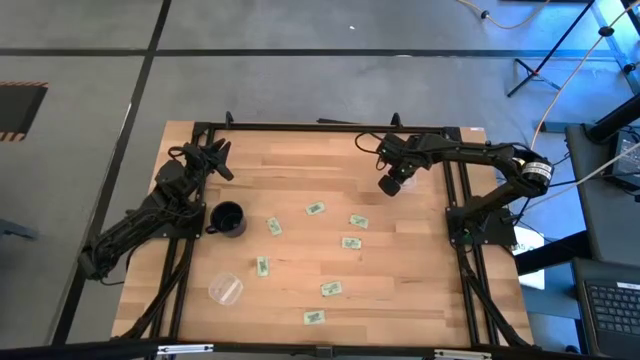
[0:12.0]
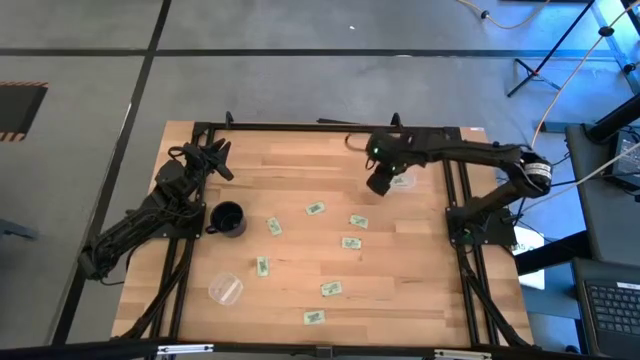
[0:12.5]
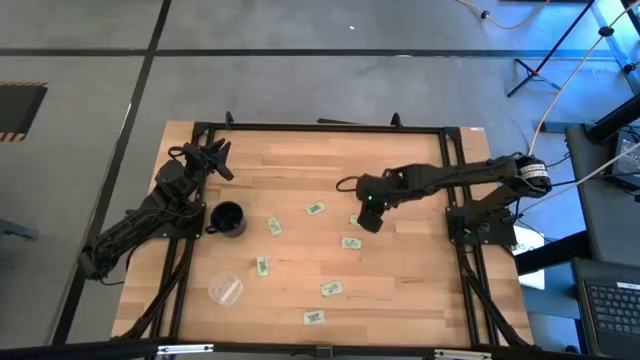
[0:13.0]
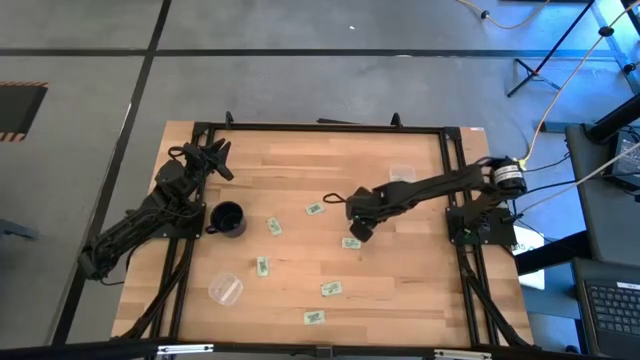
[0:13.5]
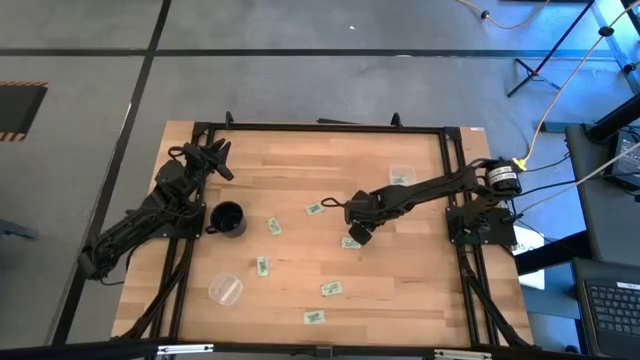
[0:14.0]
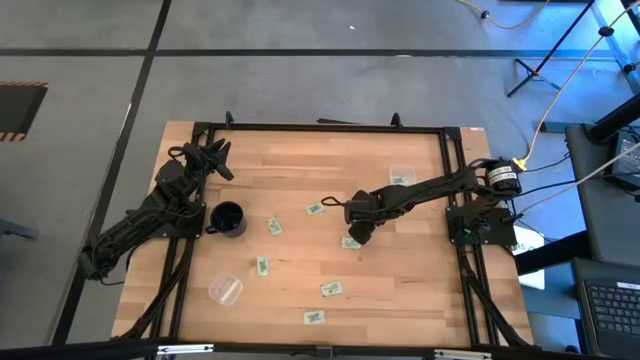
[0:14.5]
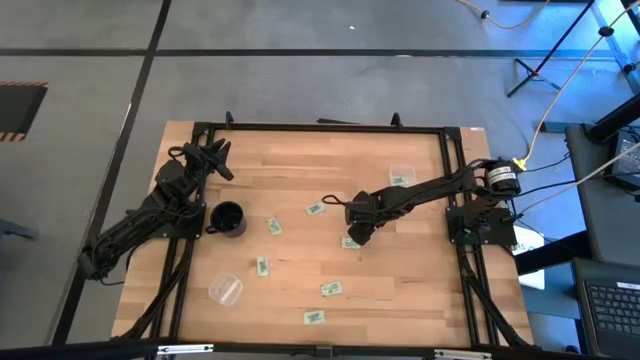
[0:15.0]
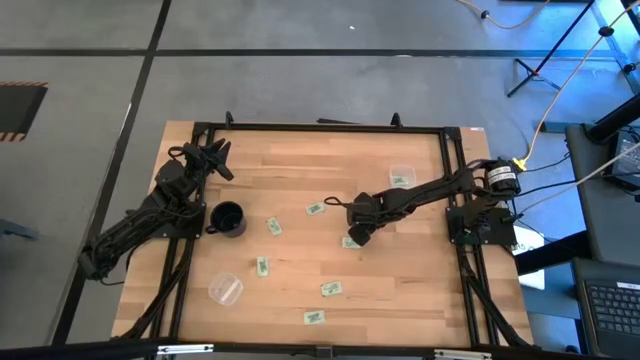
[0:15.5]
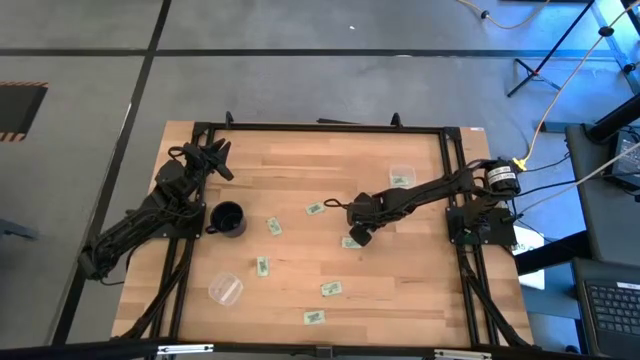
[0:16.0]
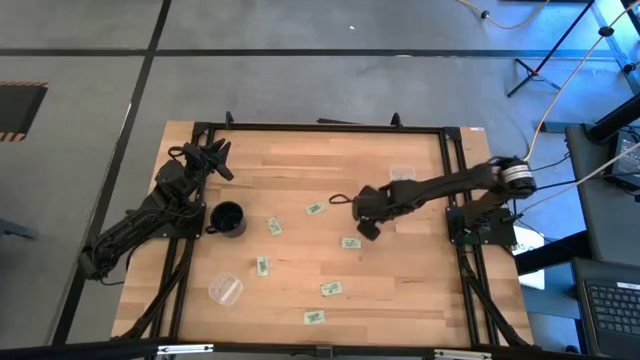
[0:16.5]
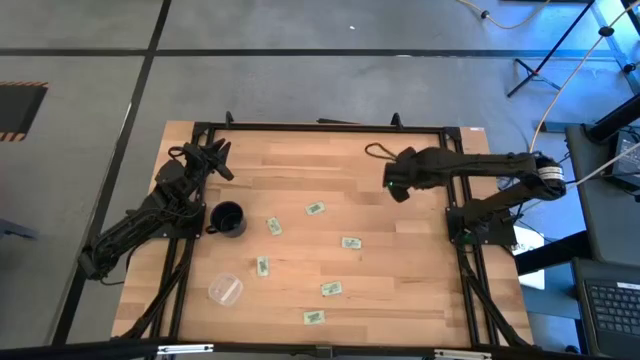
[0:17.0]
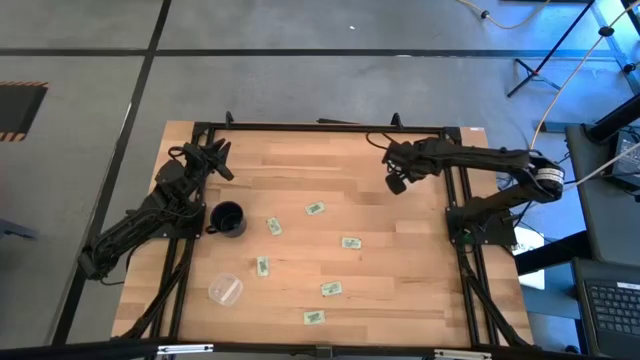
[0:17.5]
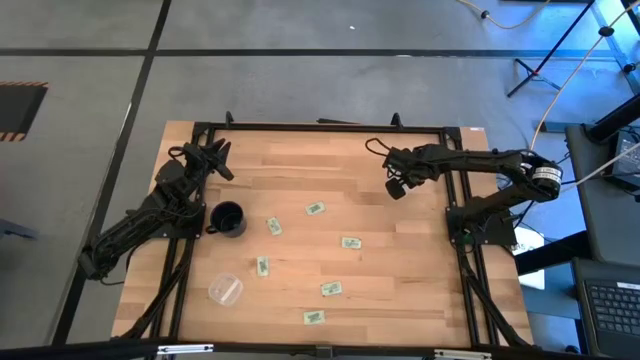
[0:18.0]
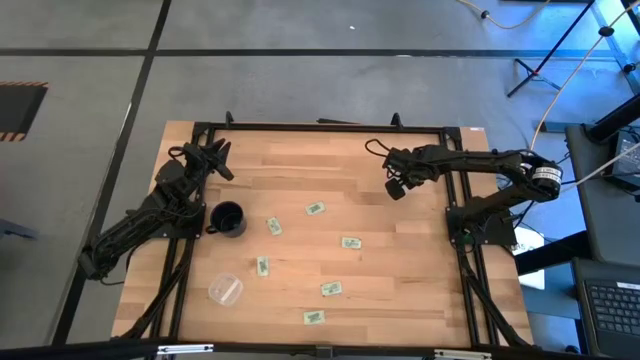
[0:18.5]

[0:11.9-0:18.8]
Task: Pick and place items into bin
Put the light green stevia packet into the top transparent bin

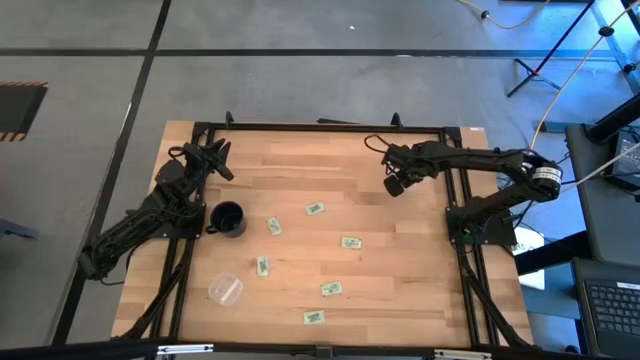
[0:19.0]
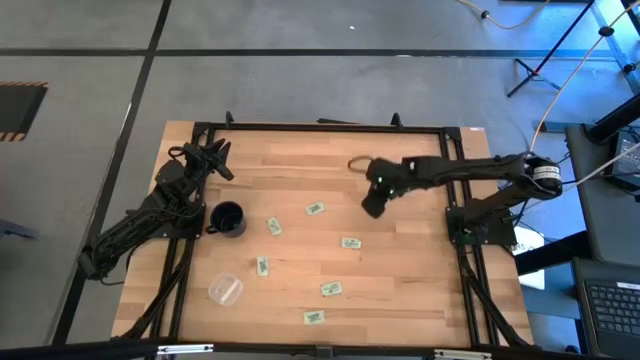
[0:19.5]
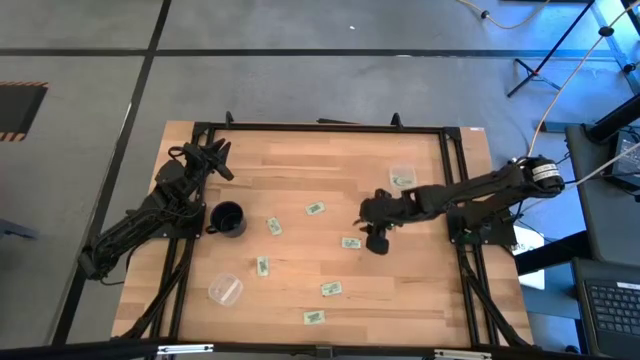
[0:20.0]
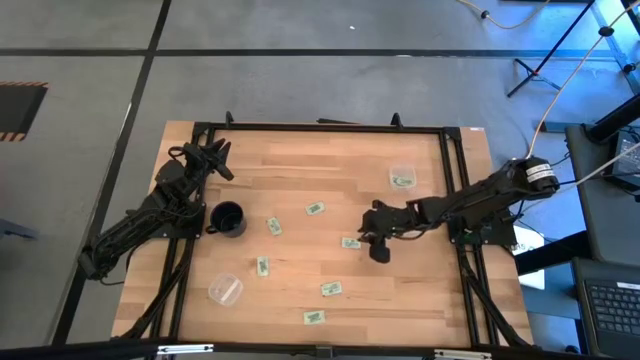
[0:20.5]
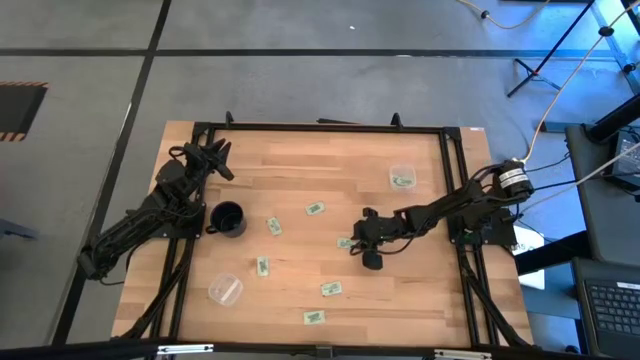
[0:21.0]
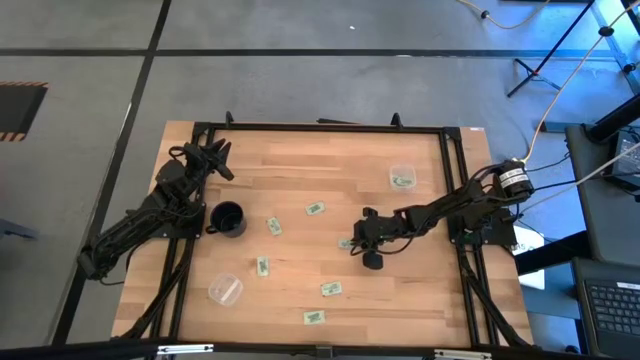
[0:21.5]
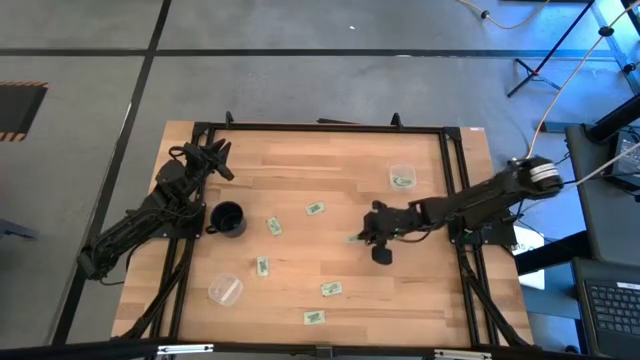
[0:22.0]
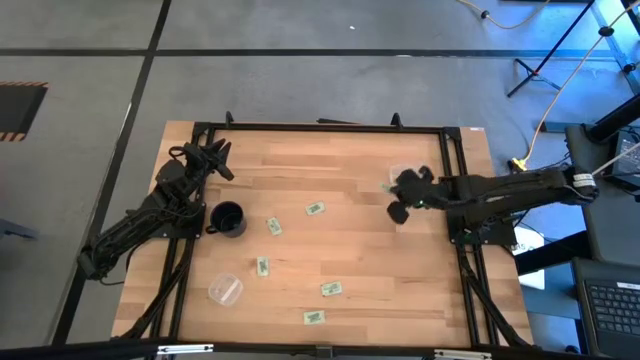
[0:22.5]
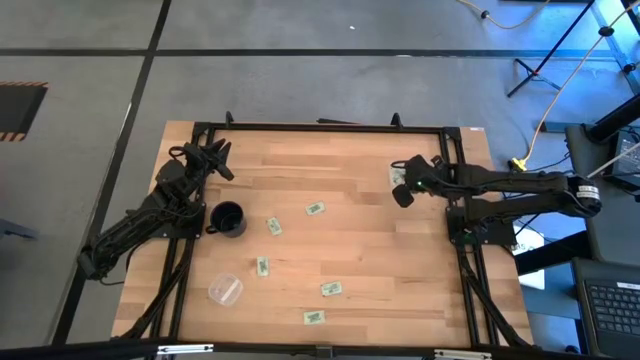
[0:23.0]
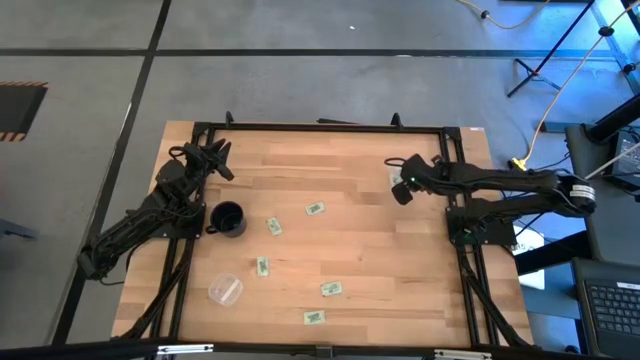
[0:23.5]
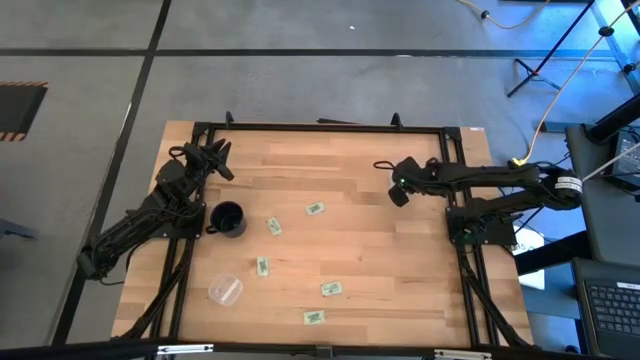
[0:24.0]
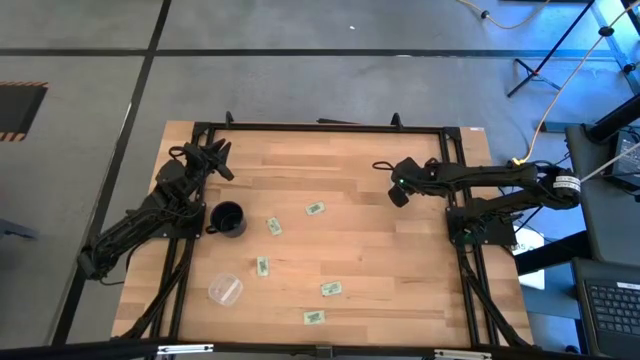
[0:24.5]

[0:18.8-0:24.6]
Put the light green stevia packet into the top transparent bin

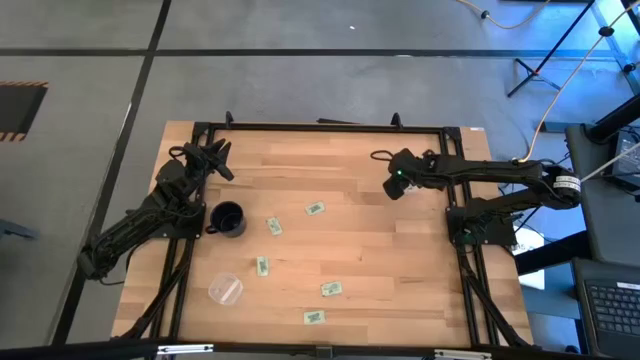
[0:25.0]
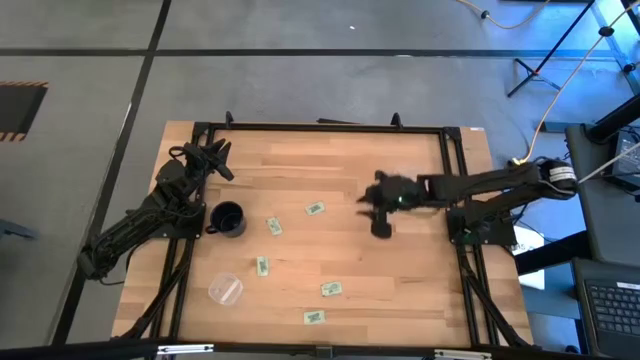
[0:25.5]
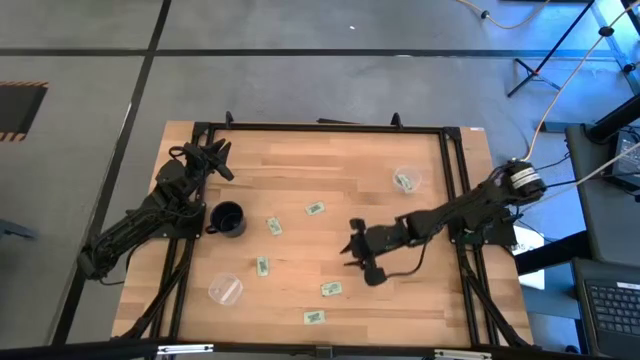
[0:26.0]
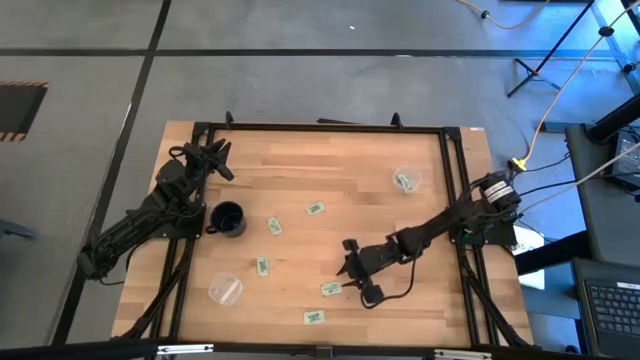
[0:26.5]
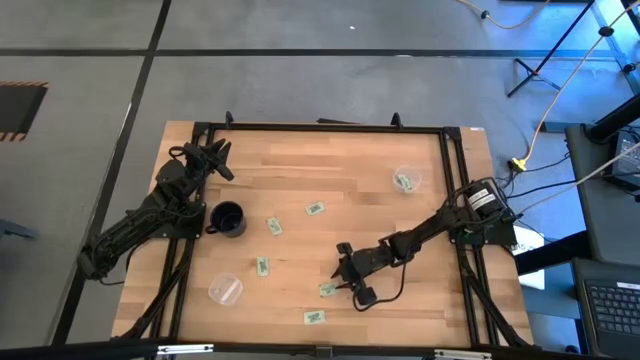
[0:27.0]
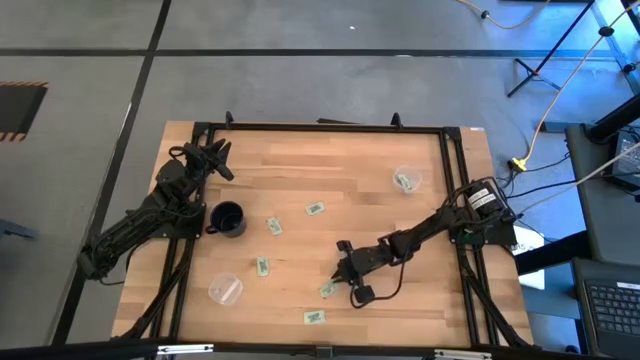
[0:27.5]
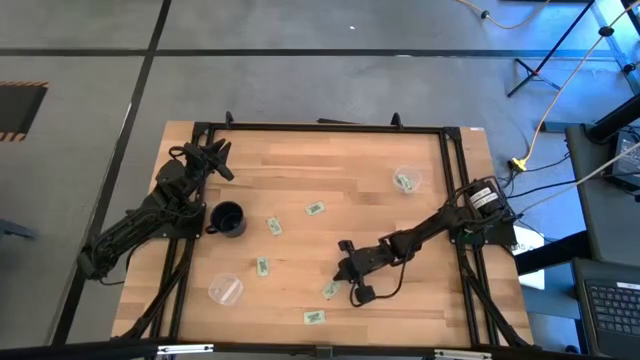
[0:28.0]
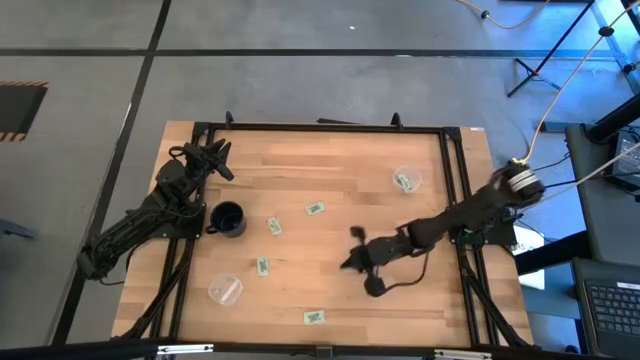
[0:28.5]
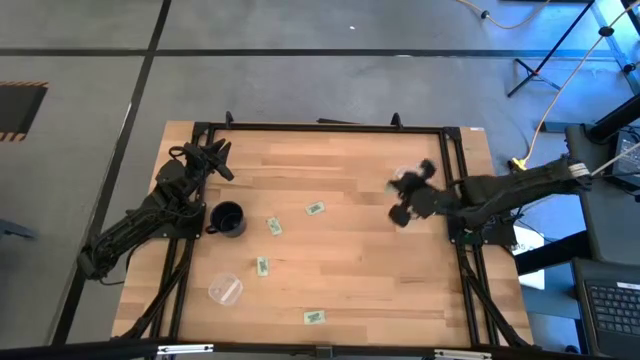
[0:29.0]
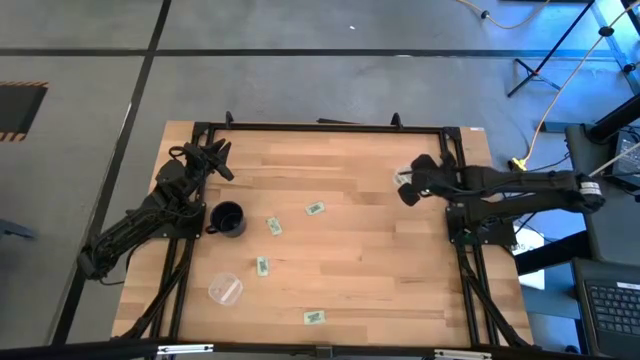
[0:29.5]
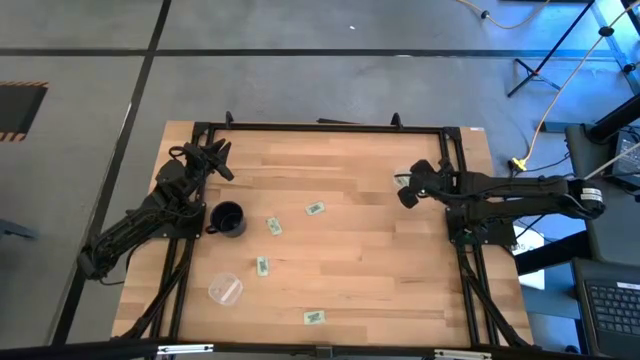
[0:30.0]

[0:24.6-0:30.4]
Put the light green stevia packet into the top transparent bin

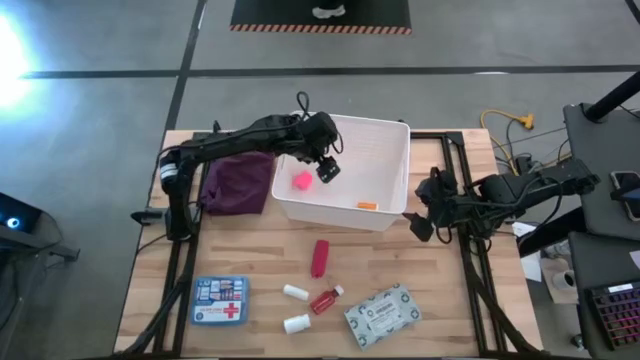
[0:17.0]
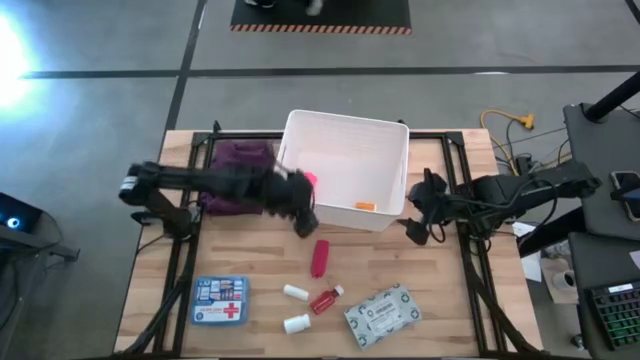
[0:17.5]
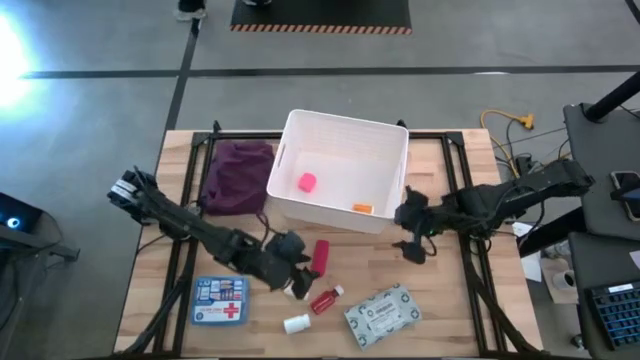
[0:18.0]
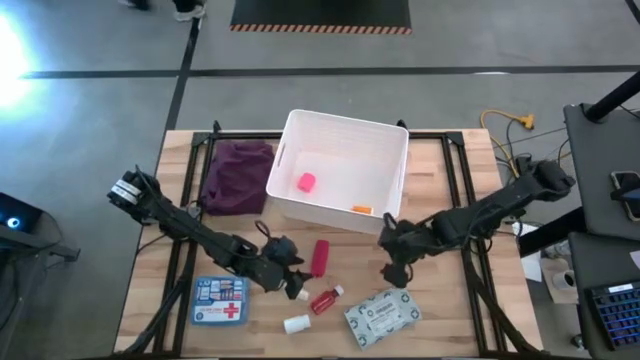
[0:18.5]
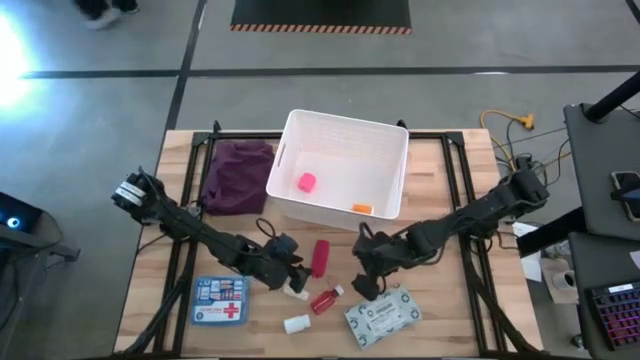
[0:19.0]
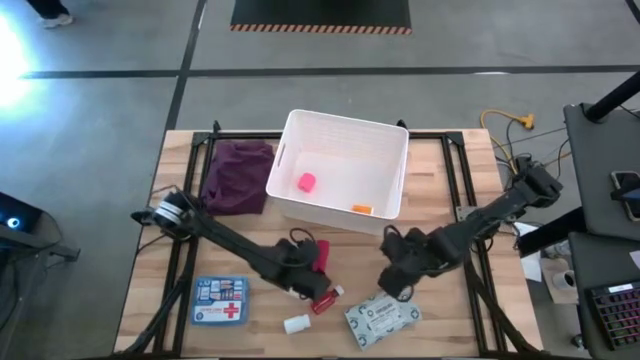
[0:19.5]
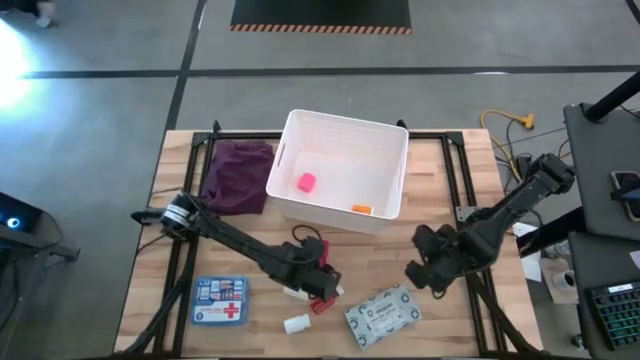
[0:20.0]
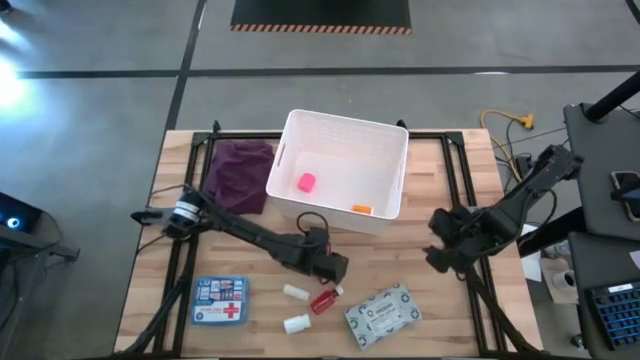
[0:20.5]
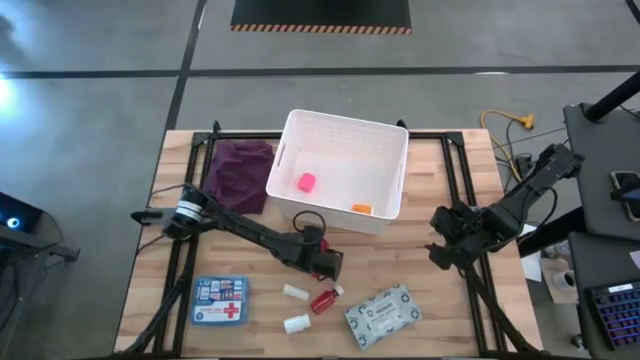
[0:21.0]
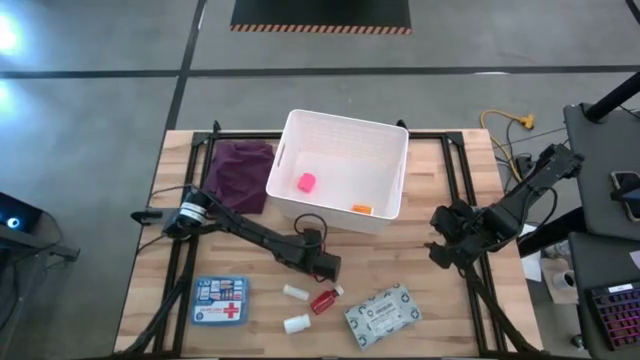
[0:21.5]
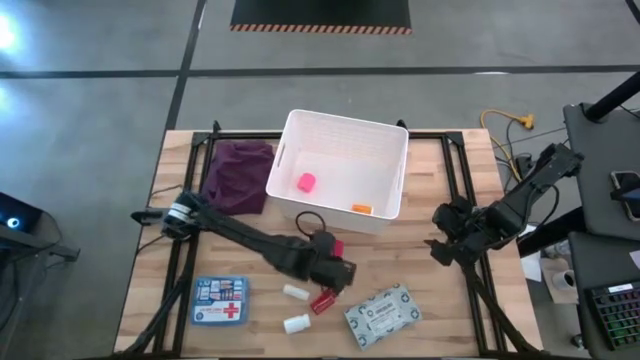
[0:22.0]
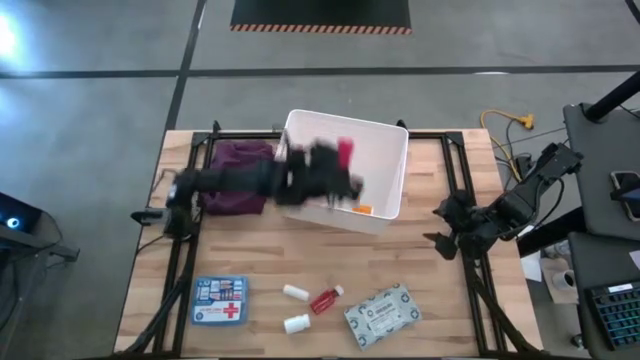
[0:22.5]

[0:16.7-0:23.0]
Task: Pick & place medical supplies in basket/bin
Put the red bandage into the white bin
